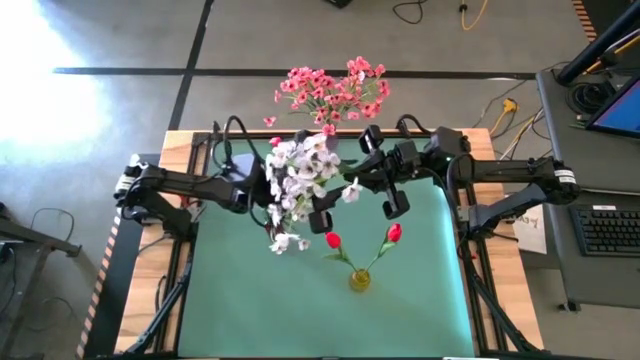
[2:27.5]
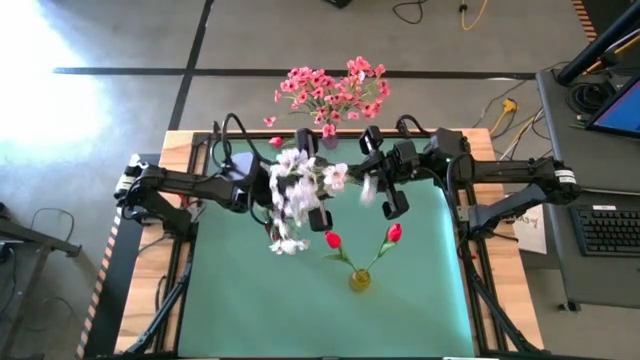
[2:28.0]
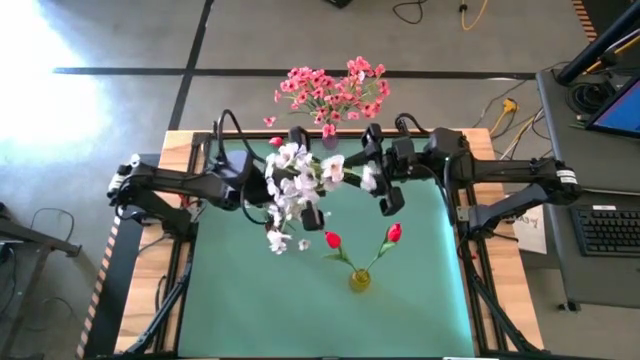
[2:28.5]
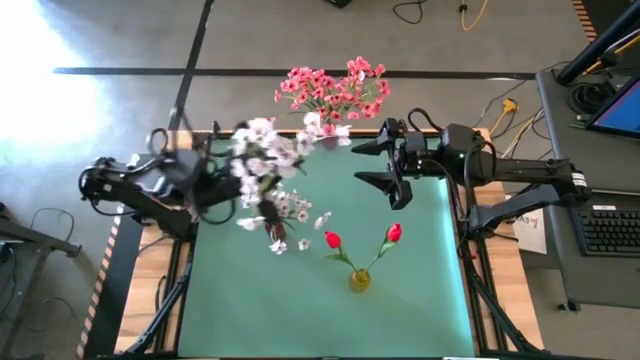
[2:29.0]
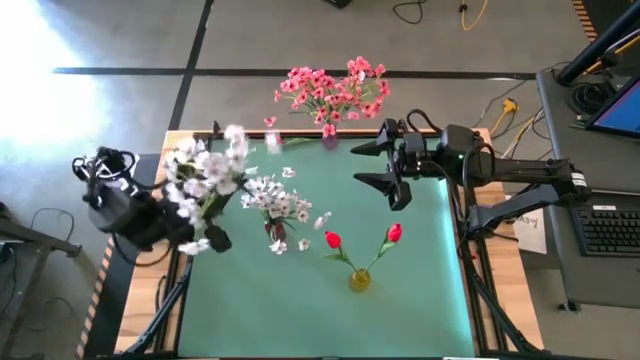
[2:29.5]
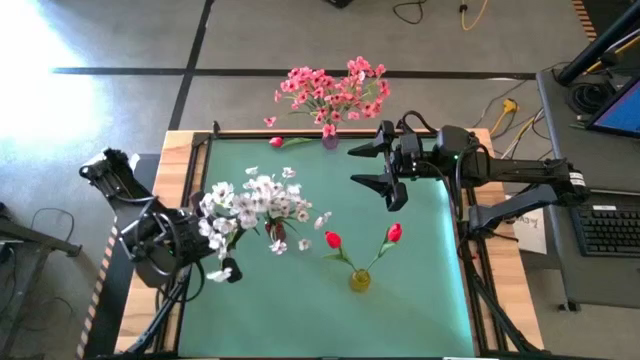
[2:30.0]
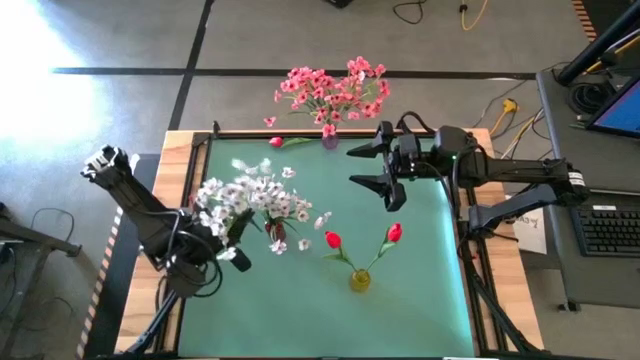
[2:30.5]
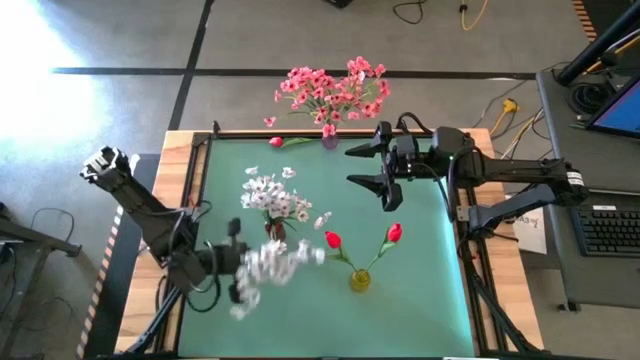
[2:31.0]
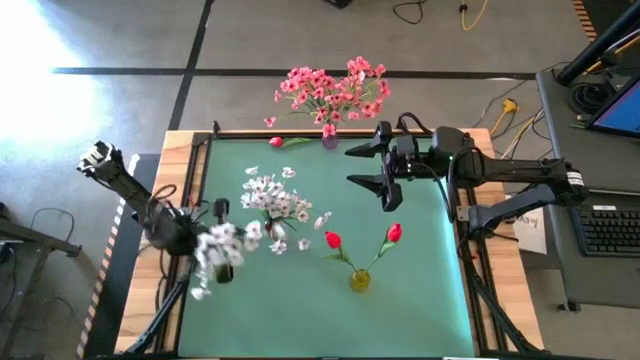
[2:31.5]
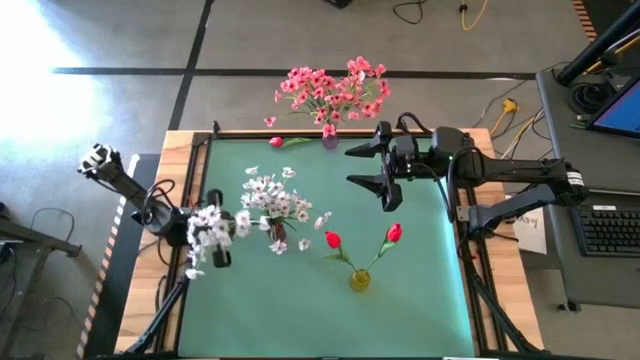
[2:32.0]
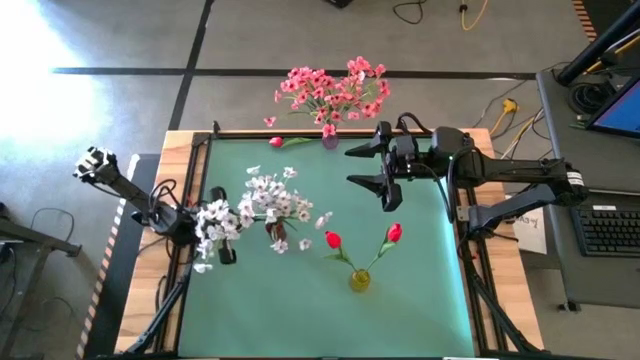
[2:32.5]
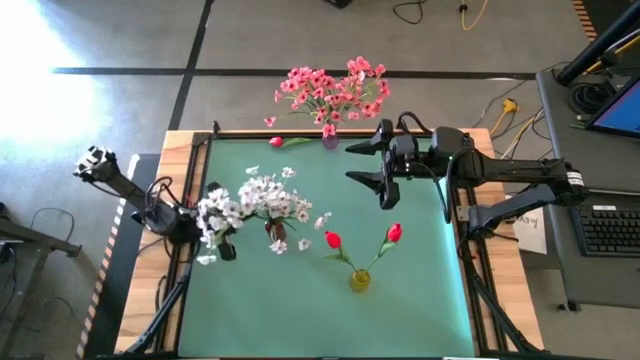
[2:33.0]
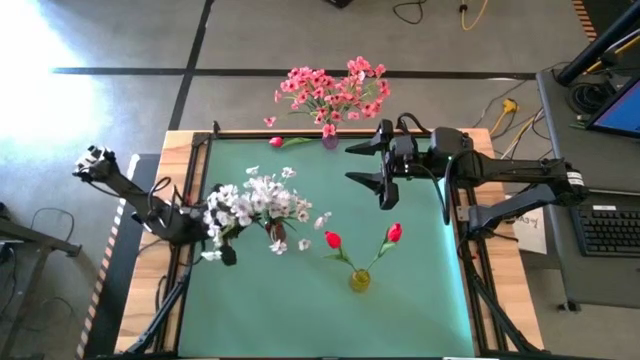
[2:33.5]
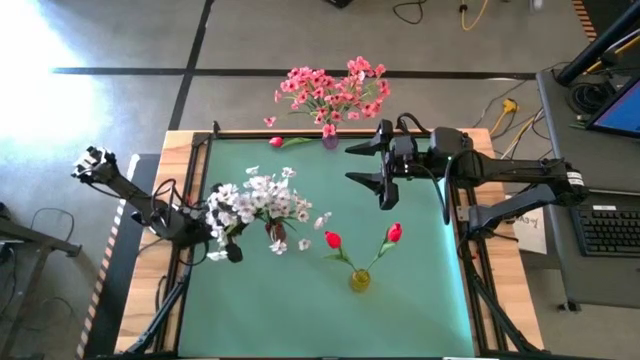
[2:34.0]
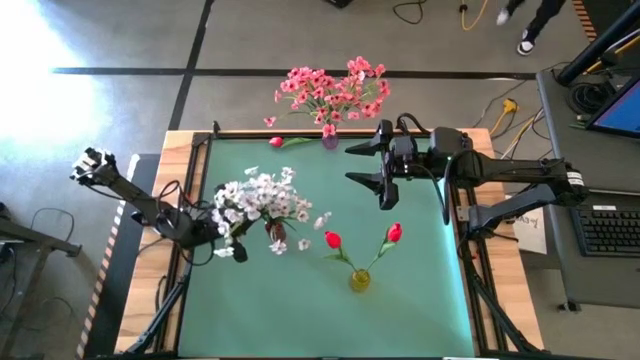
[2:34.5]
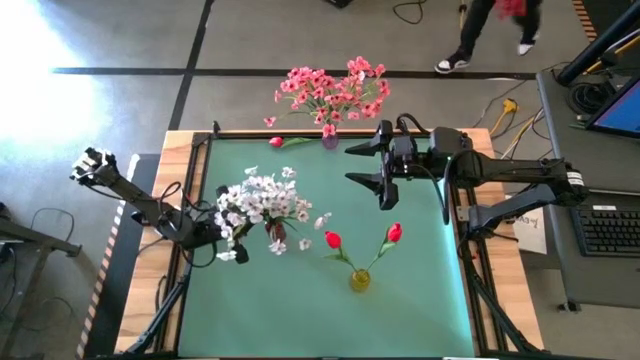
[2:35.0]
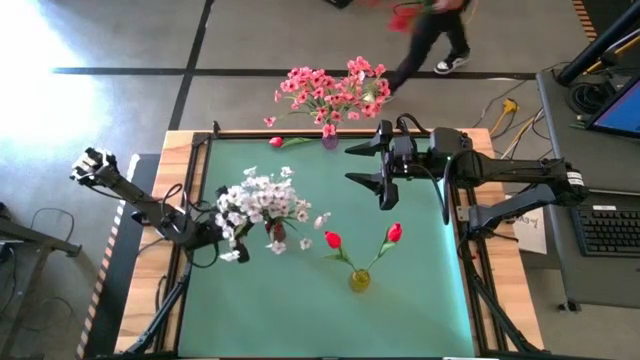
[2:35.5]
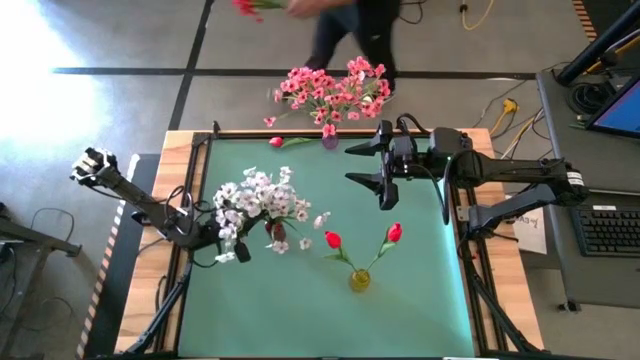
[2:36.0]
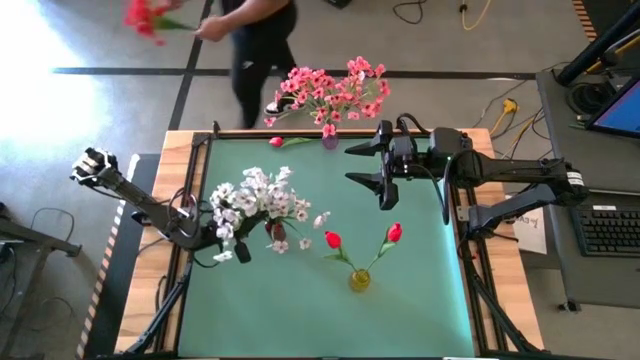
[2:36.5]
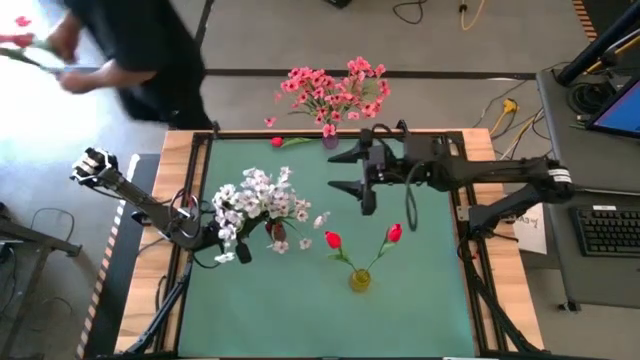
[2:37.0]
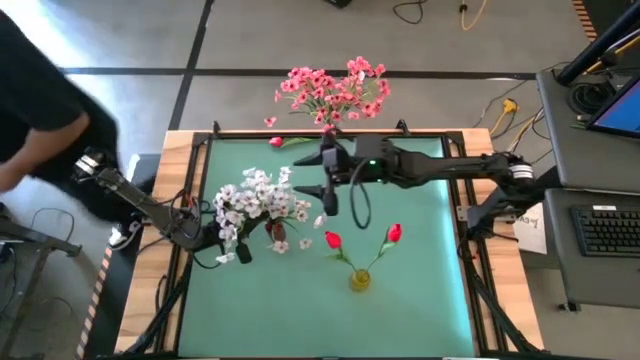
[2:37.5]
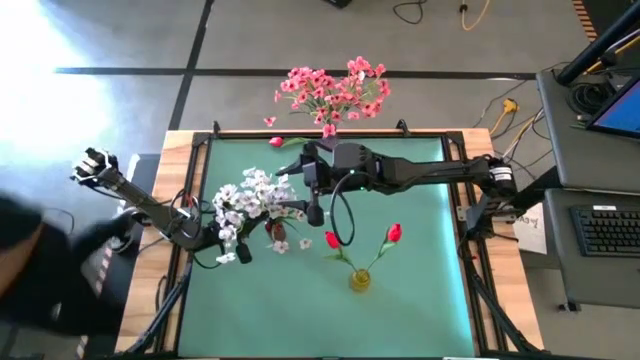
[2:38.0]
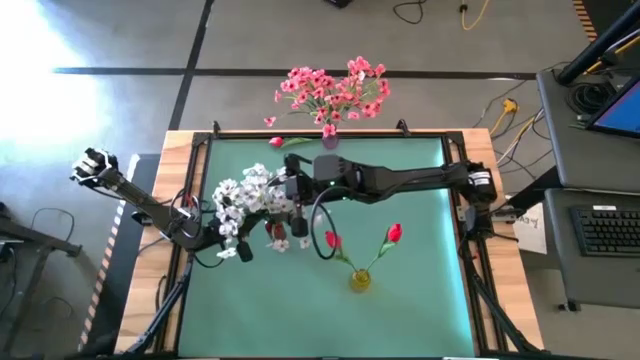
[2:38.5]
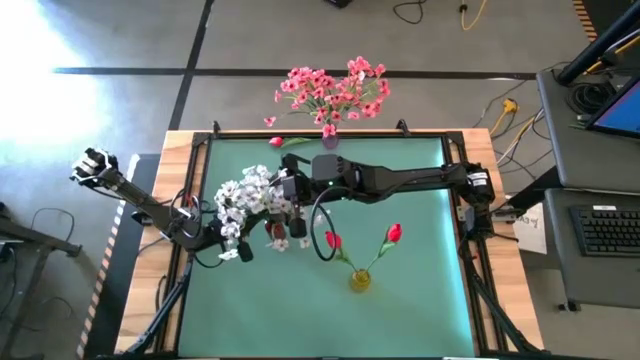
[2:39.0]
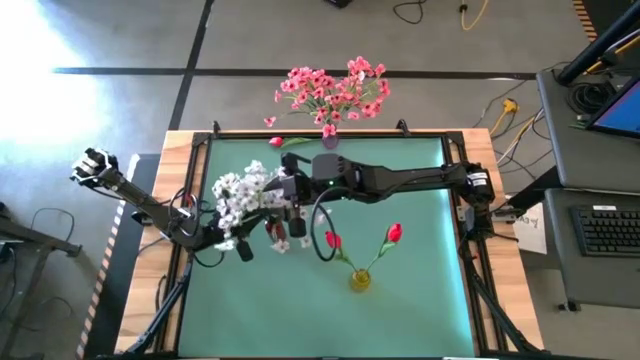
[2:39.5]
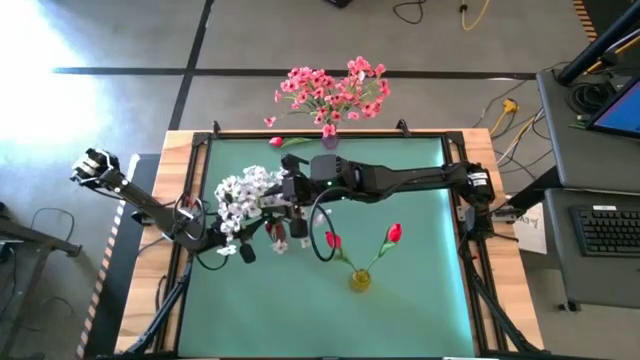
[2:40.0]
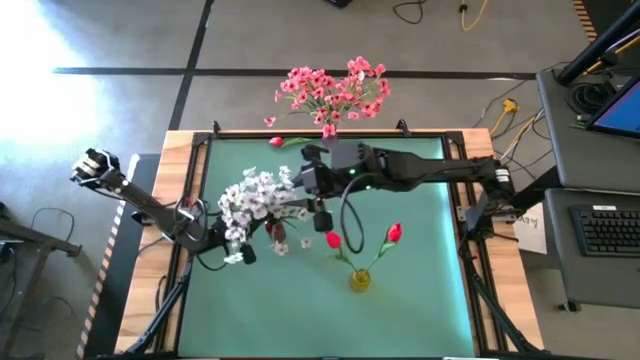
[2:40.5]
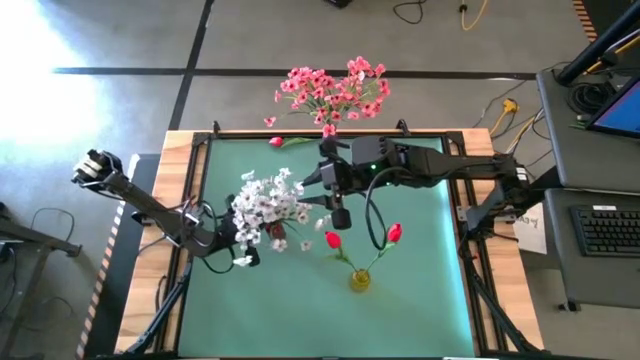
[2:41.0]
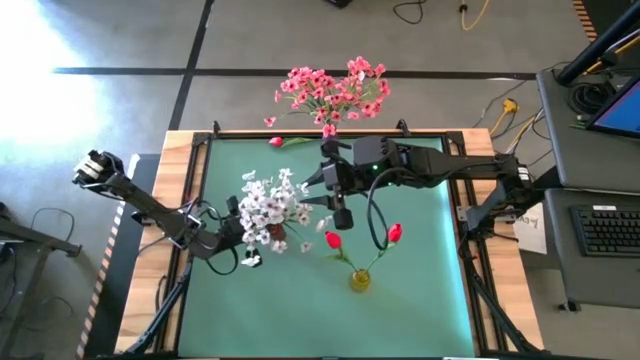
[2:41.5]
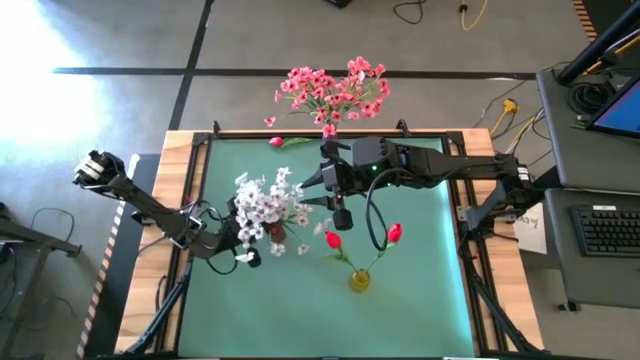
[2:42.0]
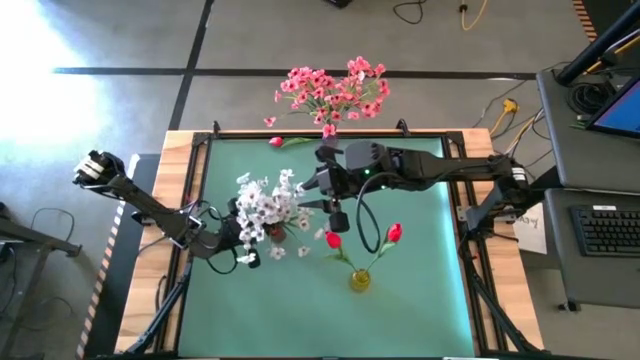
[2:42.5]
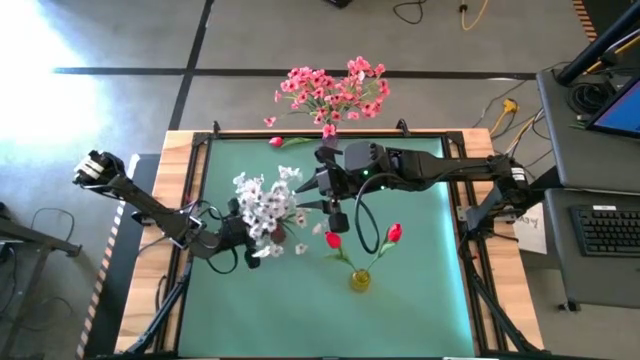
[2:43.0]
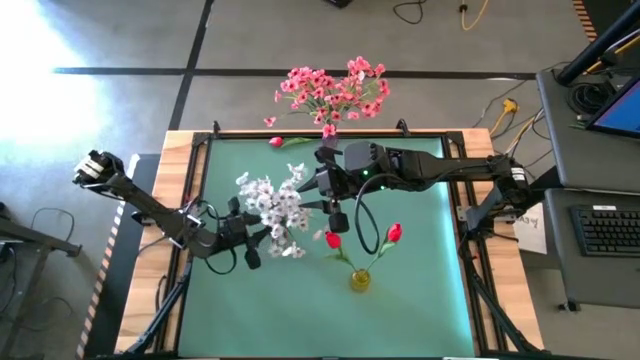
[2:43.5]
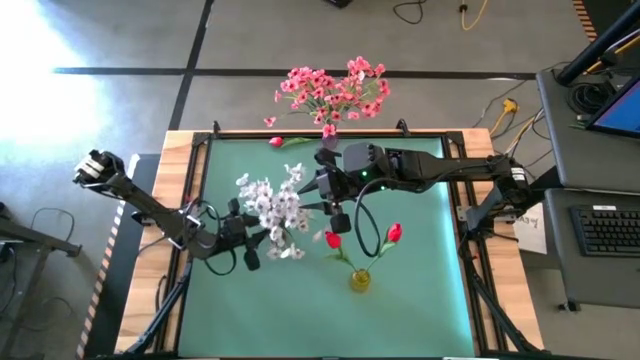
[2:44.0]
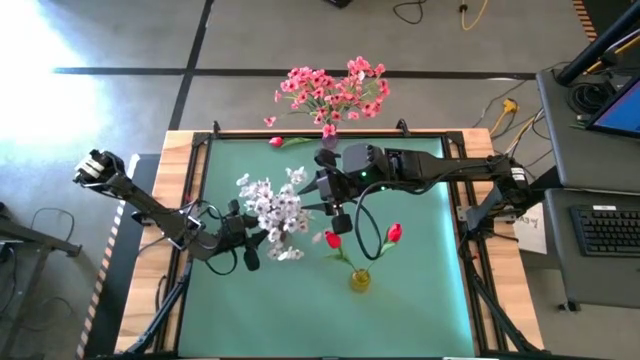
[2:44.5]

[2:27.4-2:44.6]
Task: Sort flowers into vase by color
Put the white flower into the red flower vase

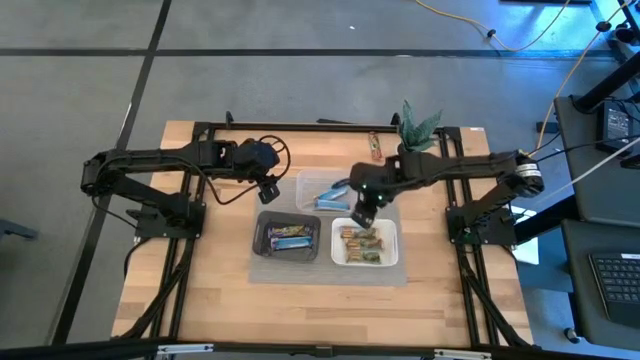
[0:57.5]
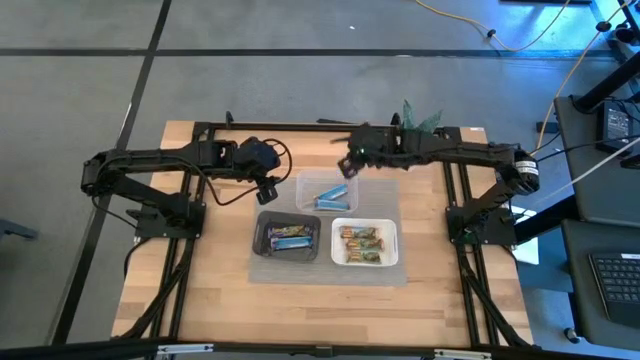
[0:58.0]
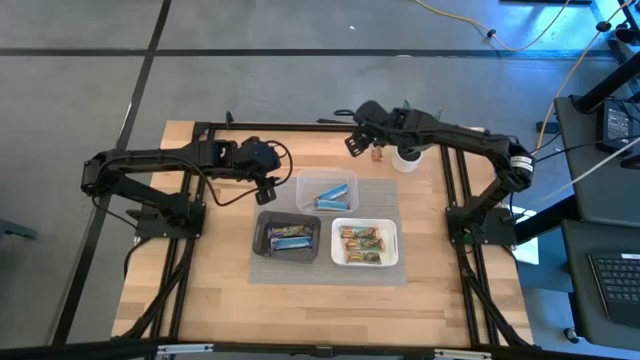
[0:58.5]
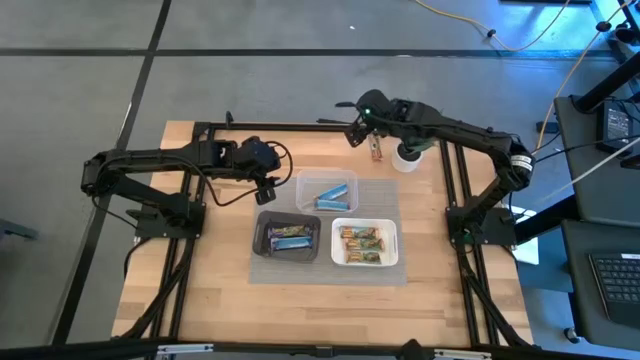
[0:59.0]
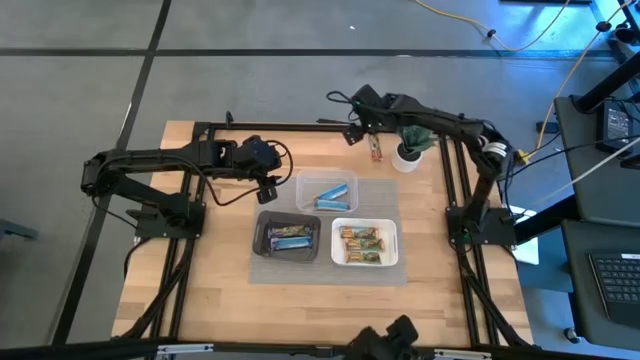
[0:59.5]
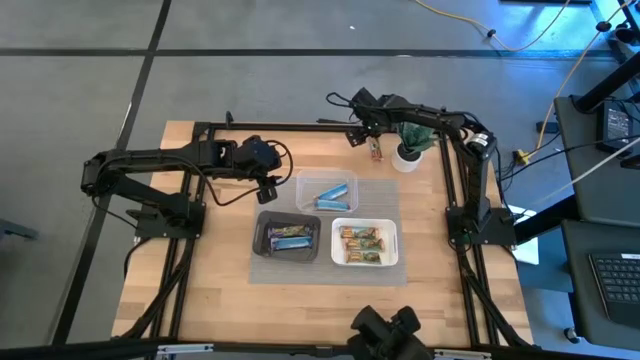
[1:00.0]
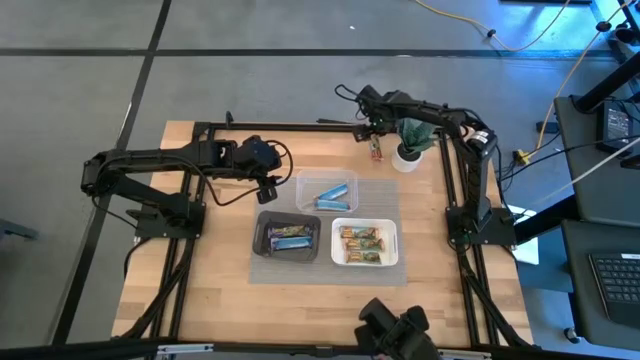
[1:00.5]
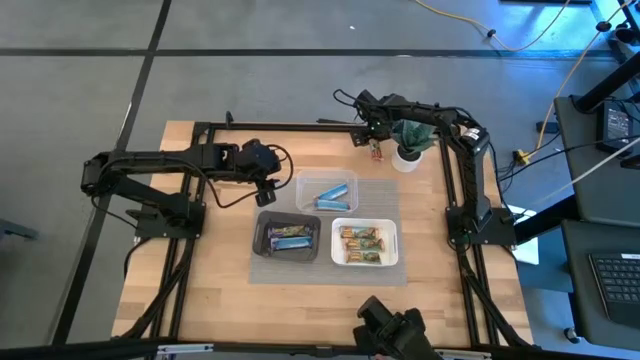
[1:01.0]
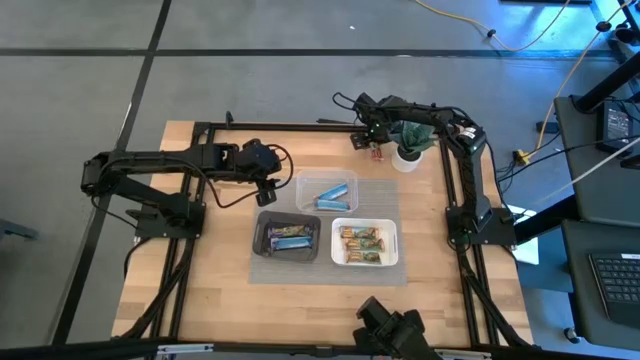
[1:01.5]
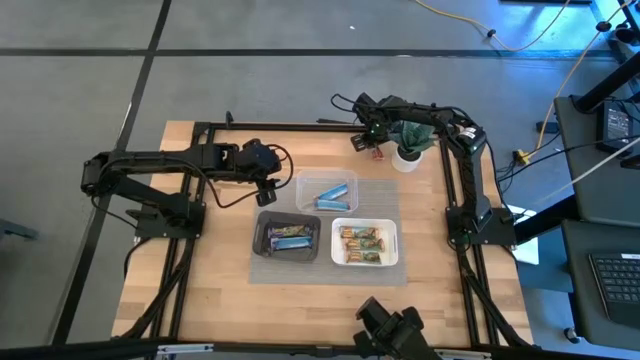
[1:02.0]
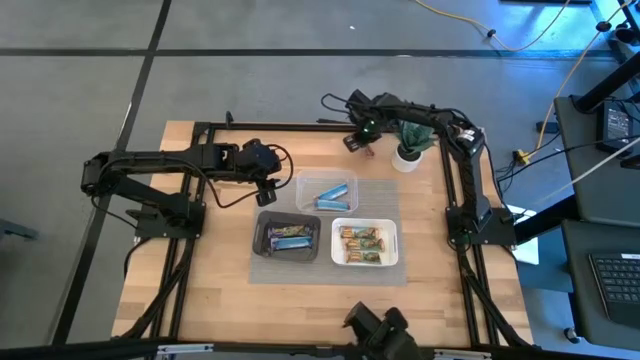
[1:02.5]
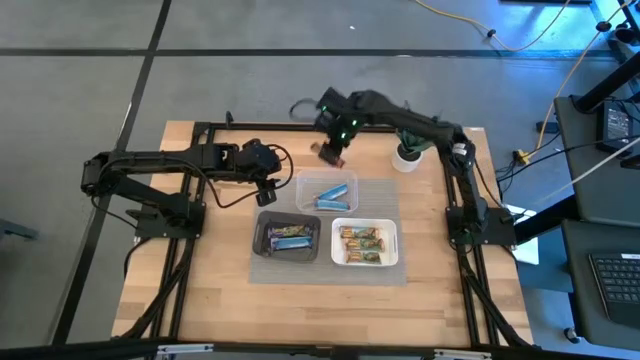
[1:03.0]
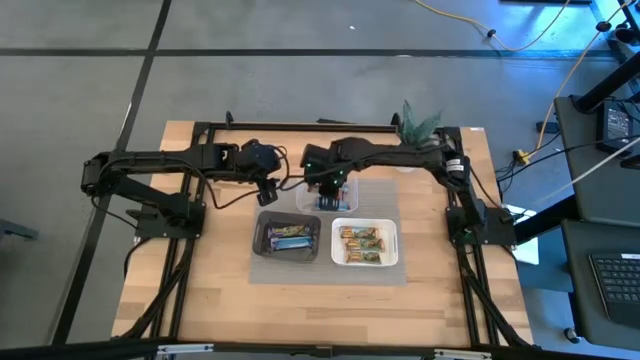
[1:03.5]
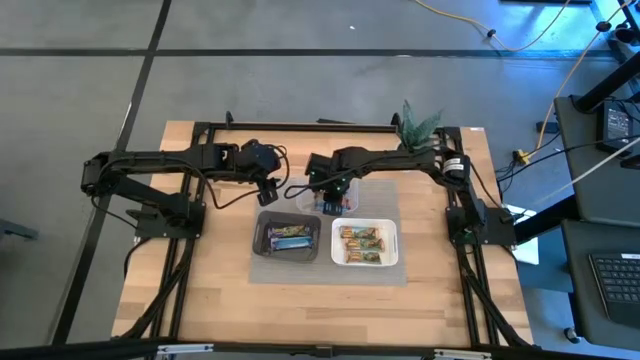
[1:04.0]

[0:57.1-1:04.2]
Task: Pick and place Granola Bars by type
Put the red granola bar into the transparent bin
